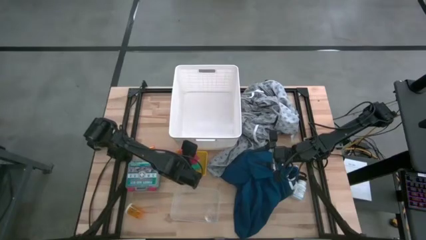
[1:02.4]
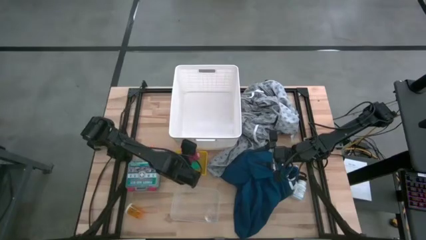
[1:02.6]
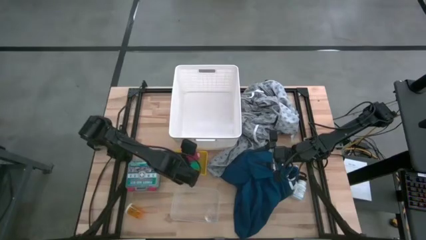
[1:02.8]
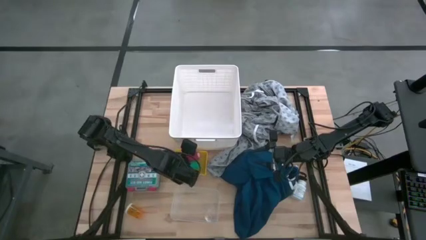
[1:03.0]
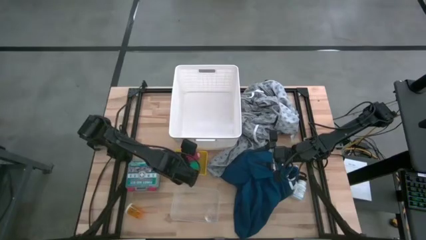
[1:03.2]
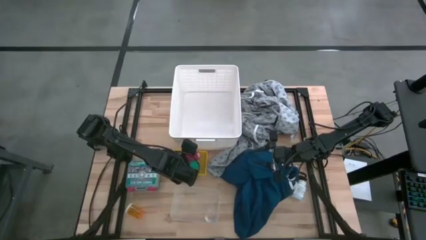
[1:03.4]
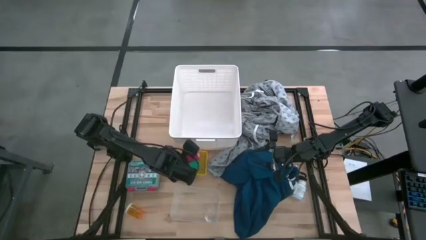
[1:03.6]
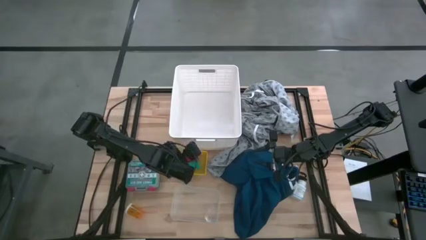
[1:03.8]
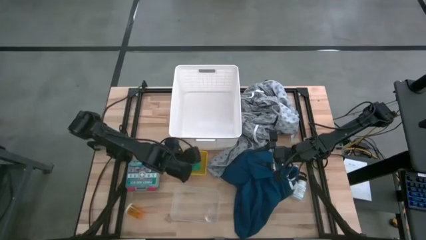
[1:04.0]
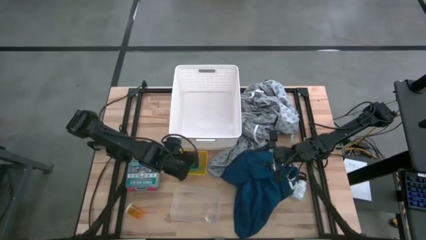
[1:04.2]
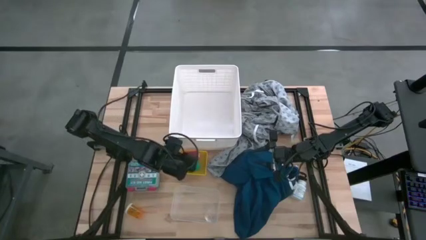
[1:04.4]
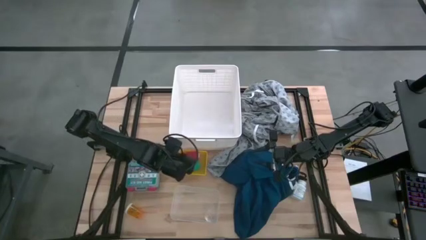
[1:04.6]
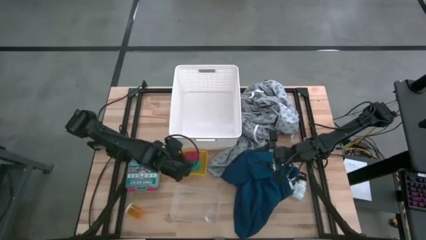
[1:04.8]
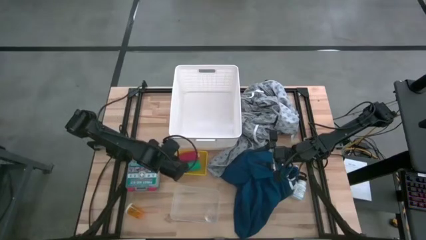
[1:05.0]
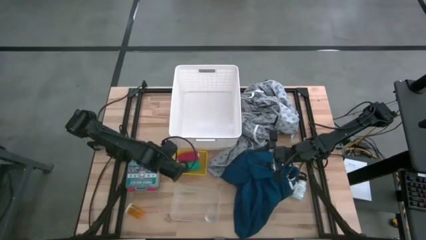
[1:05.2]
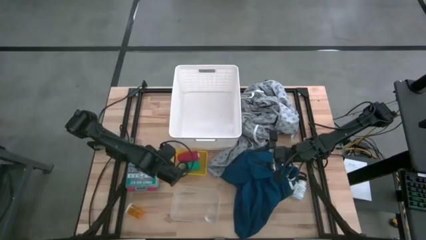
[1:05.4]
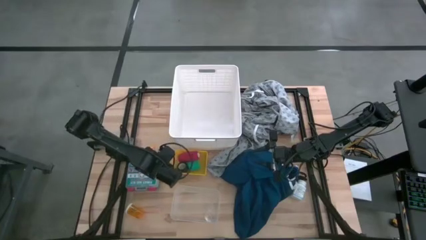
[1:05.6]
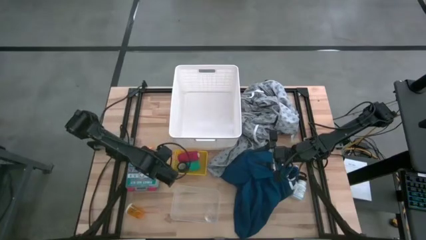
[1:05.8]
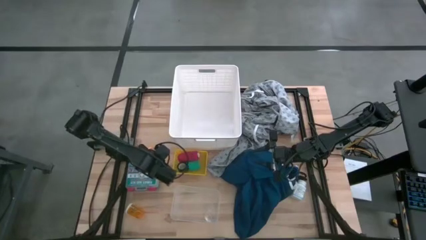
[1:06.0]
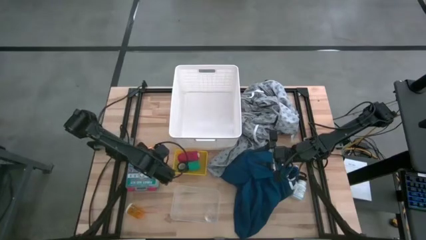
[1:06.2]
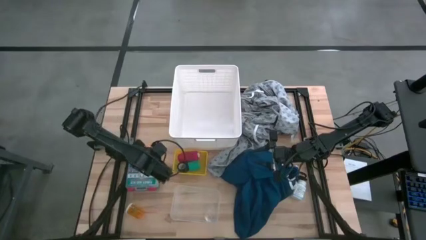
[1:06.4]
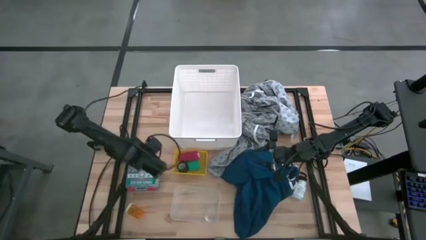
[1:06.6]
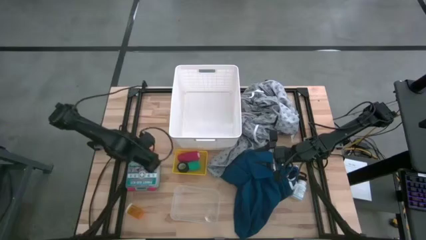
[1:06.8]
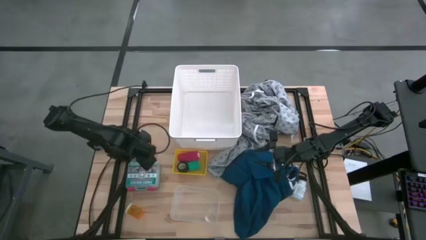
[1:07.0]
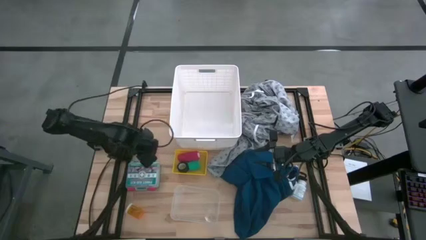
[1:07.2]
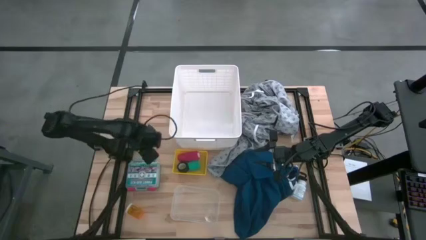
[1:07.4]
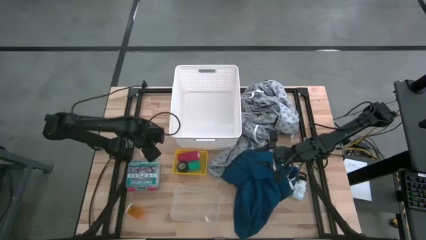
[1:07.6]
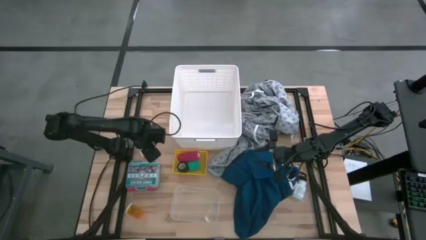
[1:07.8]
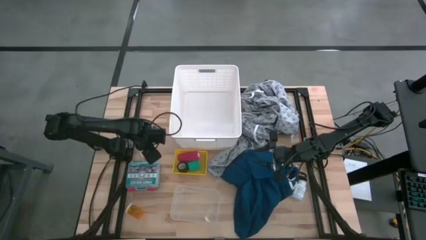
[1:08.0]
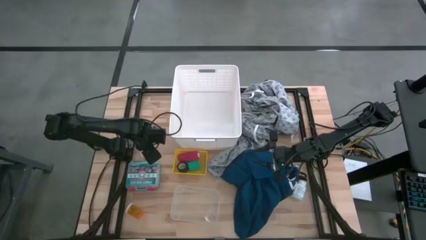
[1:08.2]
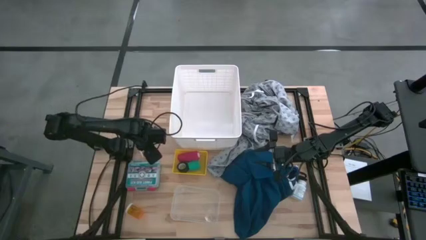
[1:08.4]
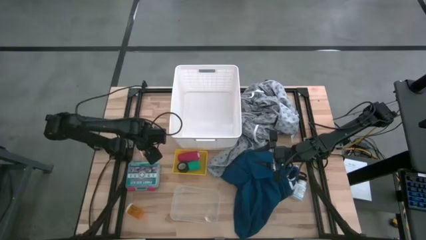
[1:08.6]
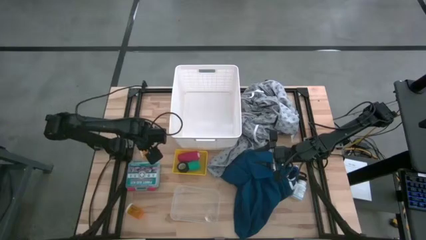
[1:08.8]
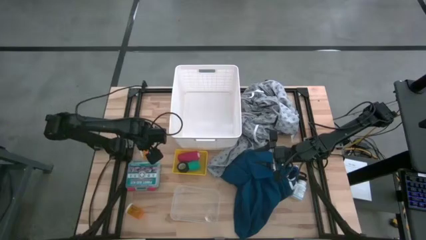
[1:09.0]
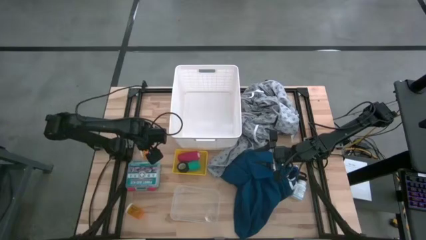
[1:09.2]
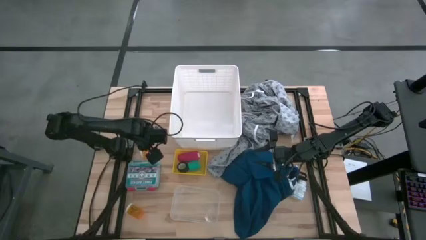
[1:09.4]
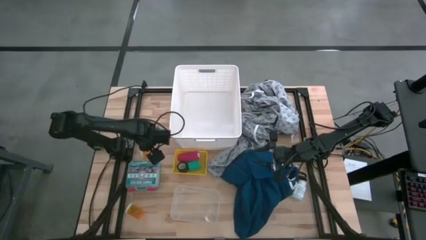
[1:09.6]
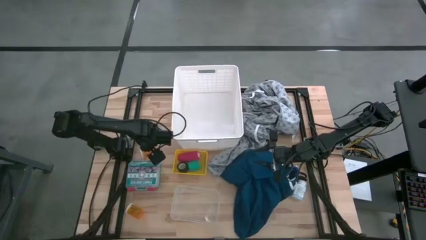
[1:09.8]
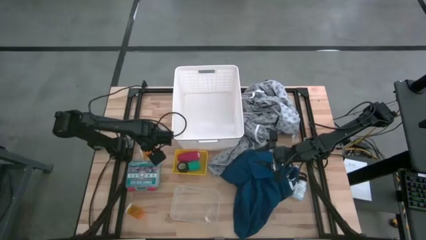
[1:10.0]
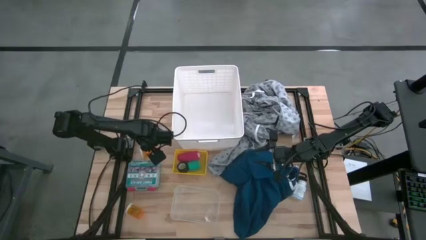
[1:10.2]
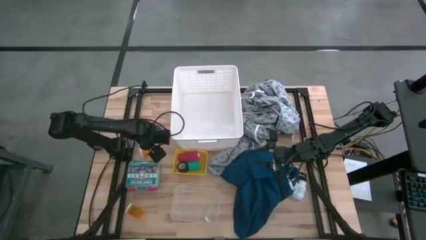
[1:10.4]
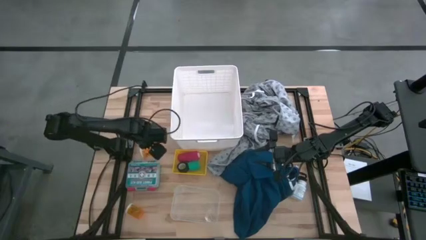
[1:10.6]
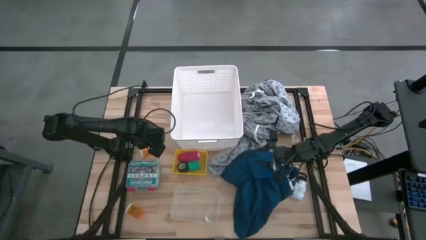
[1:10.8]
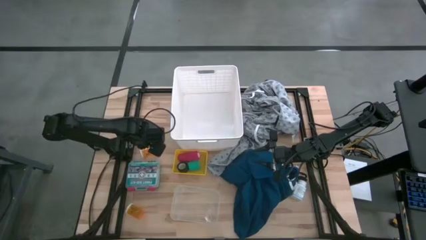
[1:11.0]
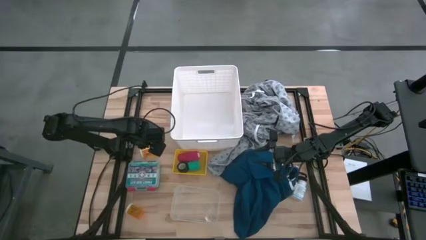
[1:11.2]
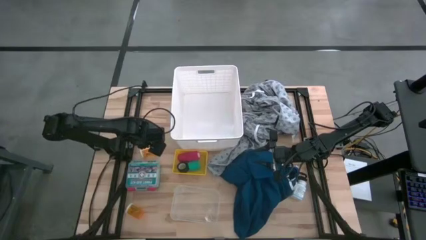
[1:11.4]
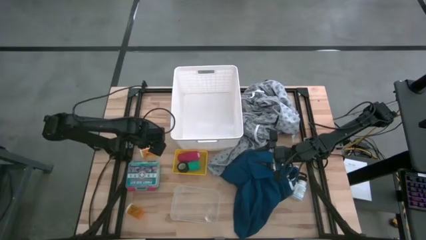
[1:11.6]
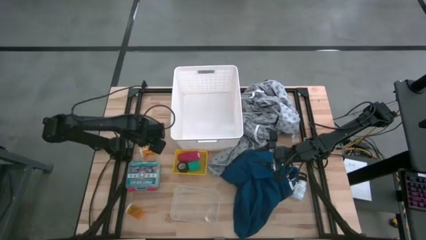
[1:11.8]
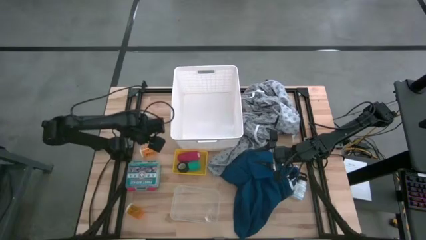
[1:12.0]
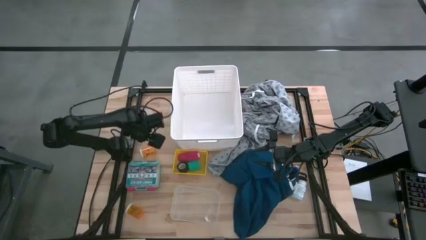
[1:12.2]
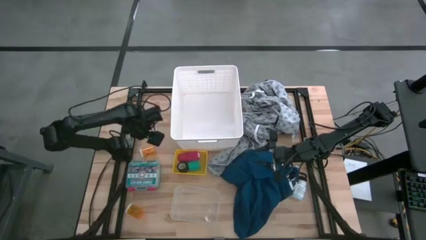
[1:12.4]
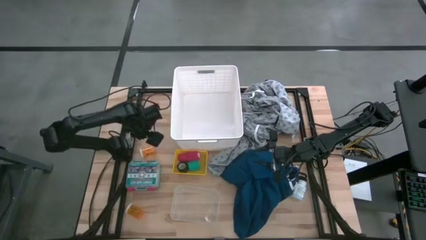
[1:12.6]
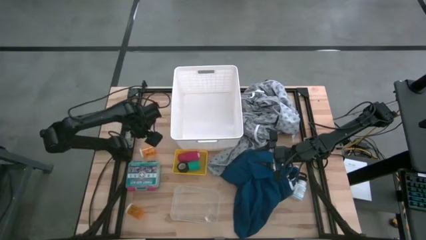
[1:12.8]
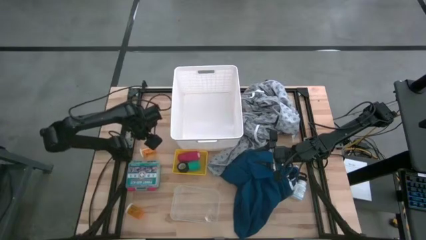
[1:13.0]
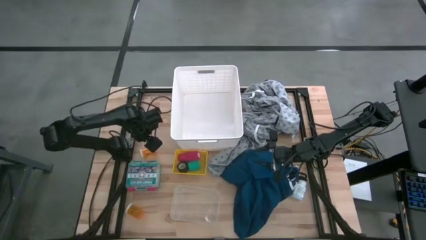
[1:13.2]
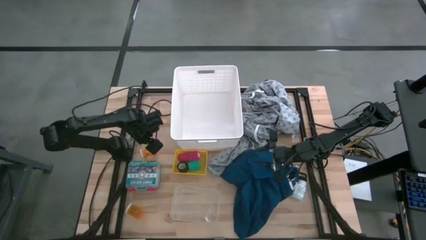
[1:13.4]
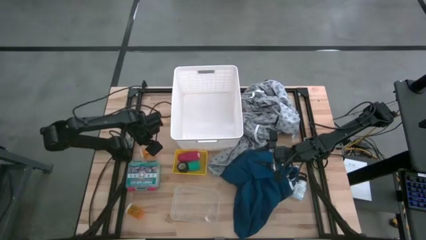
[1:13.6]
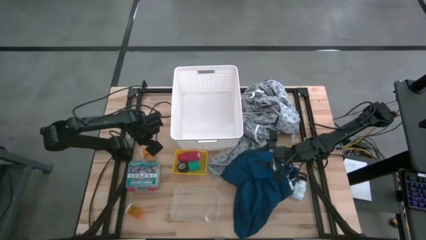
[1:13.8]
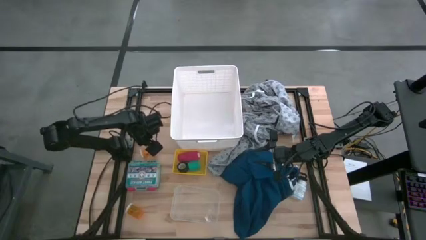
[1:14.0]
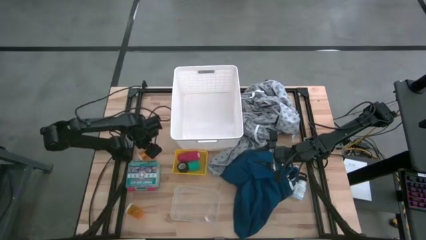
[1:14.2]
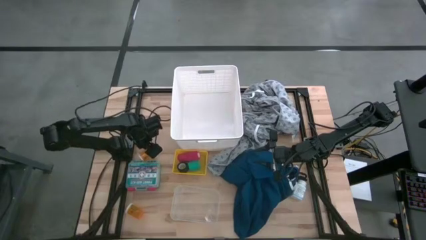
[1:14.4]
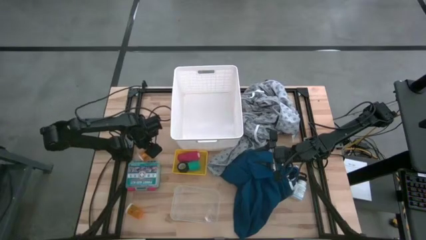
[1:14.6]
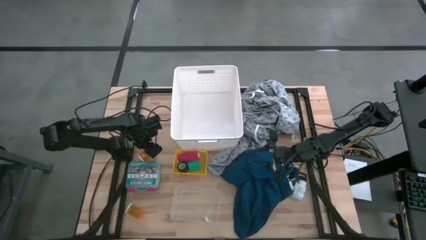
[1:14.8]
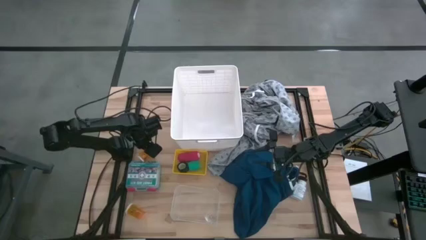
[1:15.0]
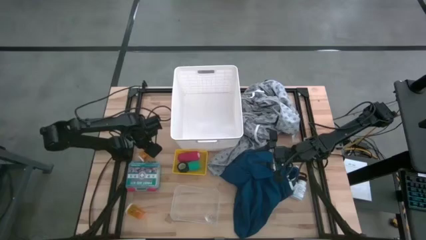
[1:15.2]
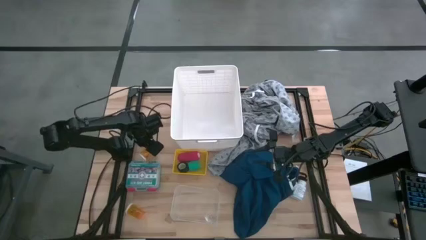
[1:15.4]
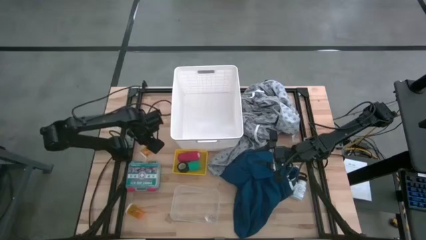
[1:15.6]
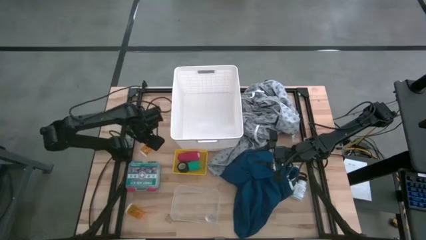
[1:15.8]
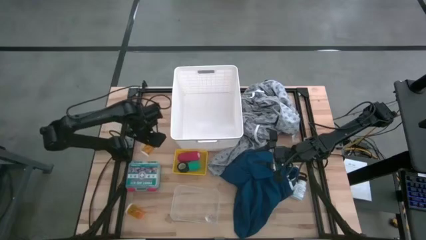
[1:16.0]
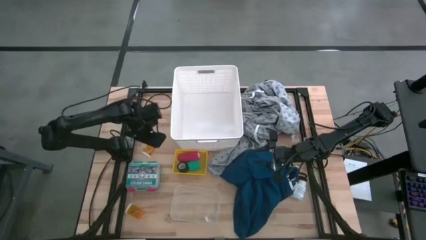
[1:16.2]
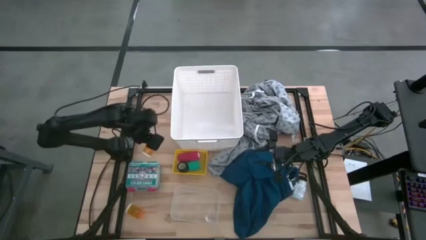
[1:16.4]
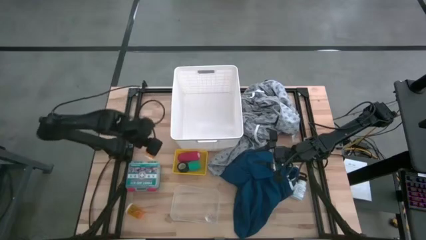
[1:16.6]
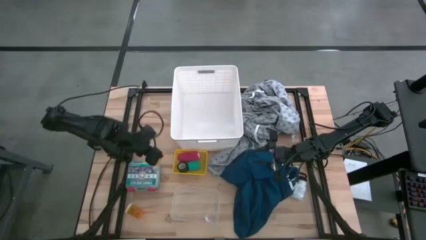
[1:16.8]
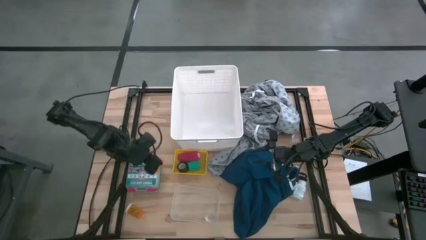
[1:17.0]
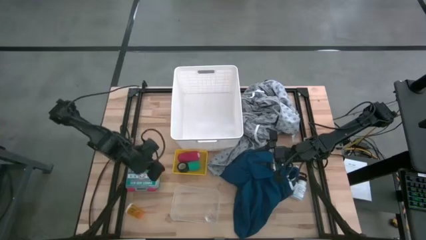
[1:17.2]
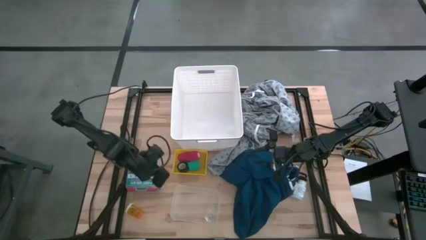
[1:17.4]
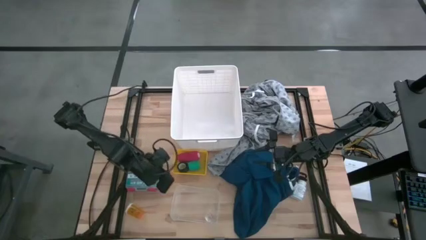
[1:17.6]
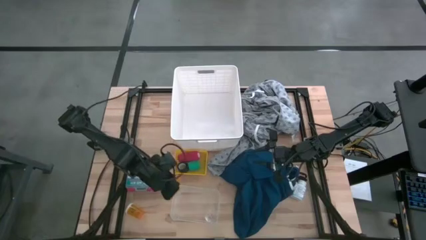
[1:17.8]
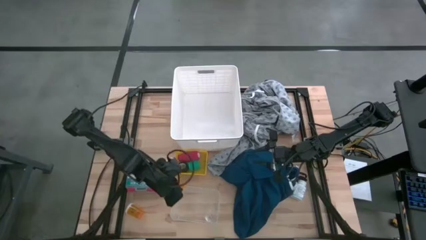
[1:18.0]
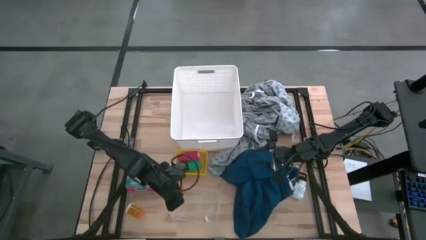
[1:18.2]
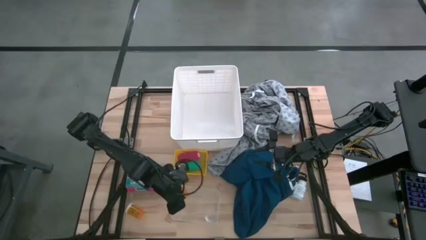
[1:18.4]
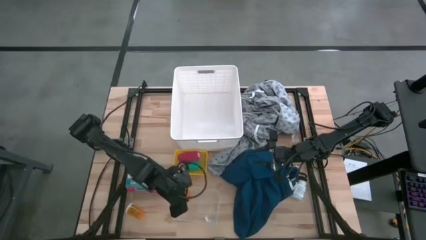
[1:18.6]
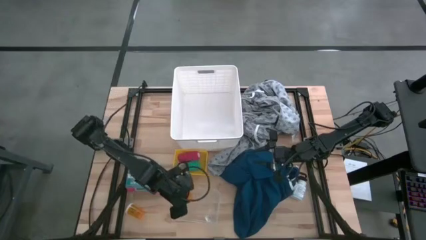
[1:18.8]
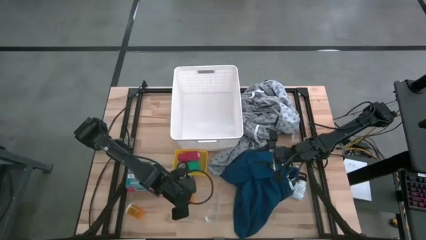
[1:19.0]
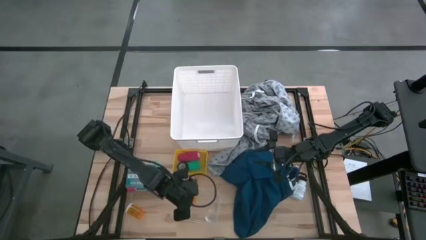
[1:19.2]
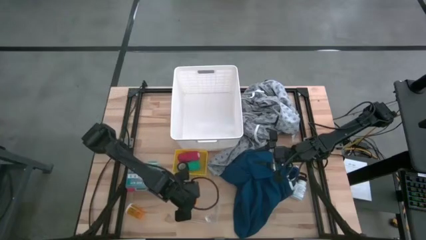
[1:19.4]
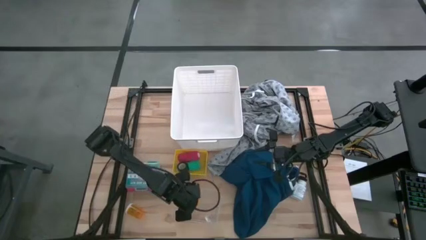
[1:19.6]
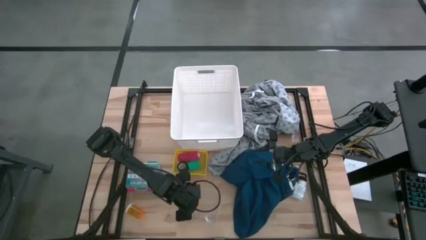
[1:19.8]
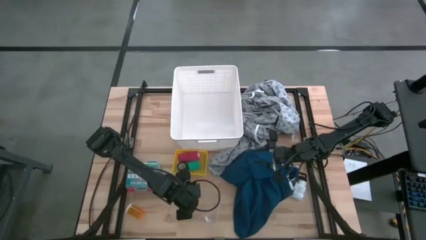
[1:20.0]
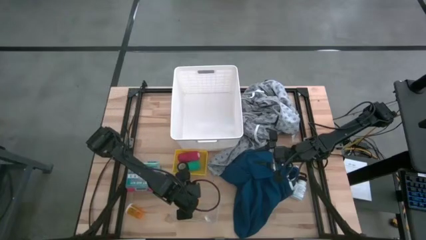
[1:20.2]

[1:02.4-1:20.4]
Task: Pick & Place Medicine items
Put the top orange medicine bottle into the transparent bin
